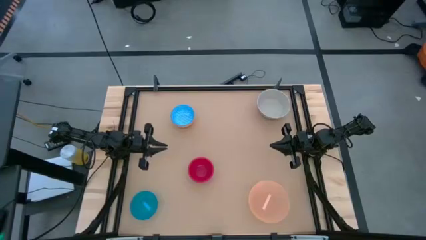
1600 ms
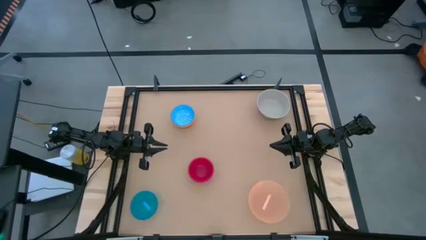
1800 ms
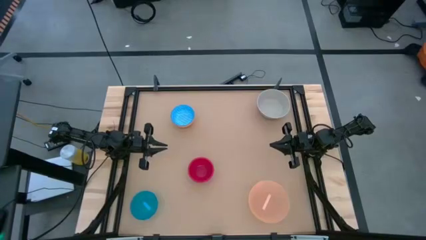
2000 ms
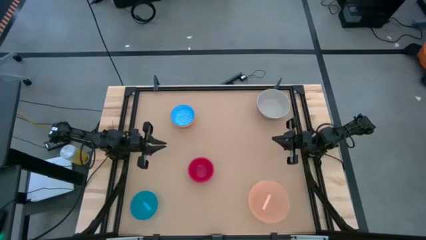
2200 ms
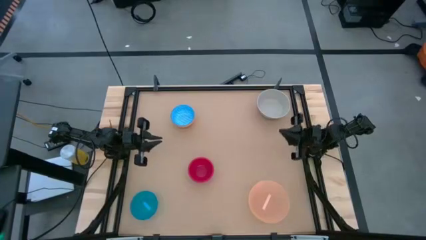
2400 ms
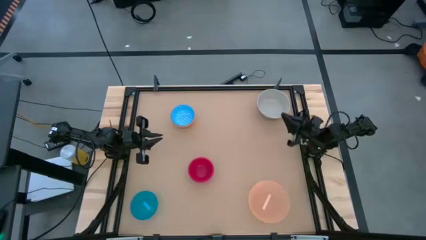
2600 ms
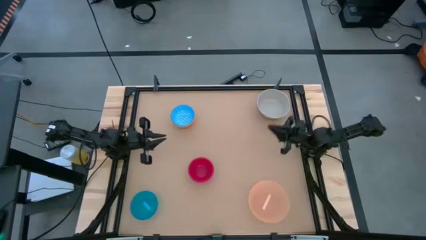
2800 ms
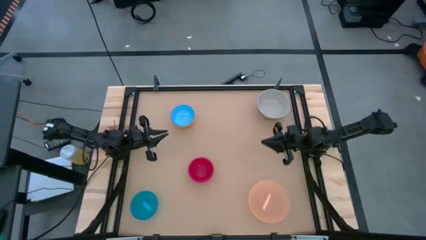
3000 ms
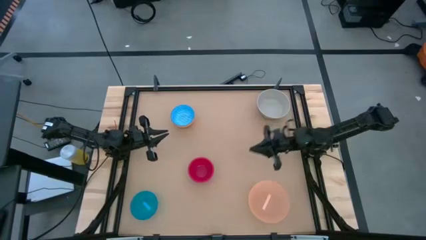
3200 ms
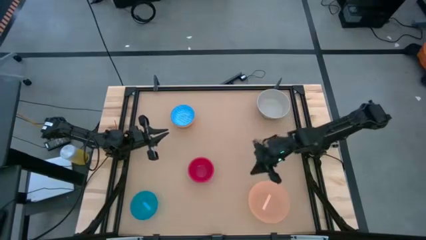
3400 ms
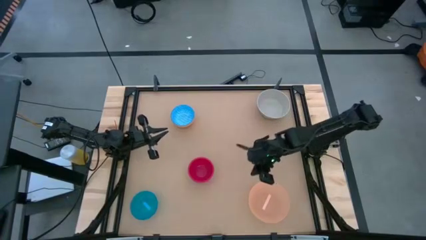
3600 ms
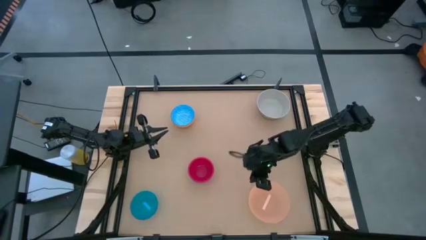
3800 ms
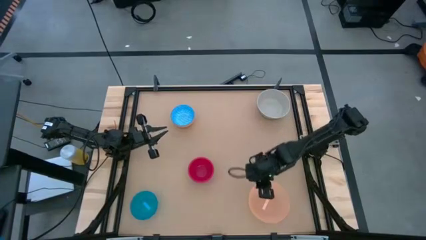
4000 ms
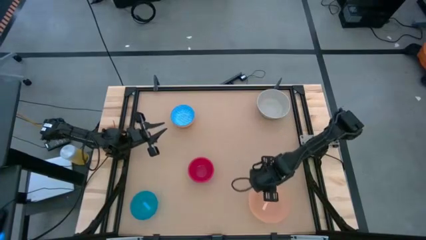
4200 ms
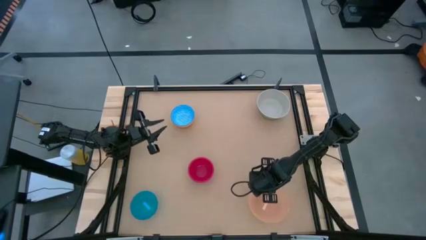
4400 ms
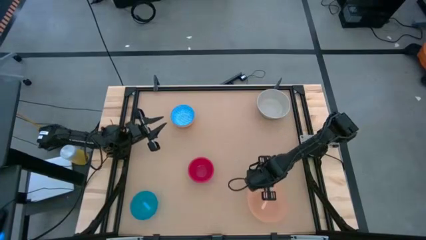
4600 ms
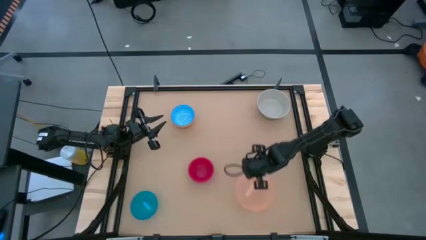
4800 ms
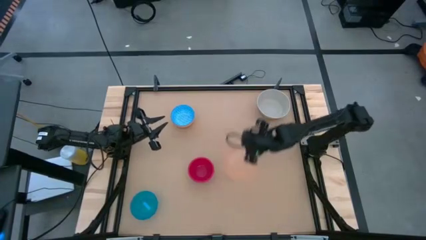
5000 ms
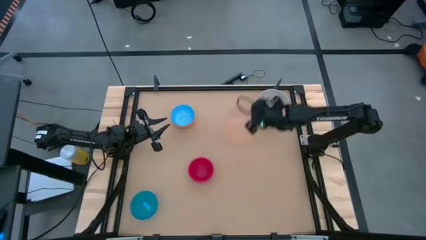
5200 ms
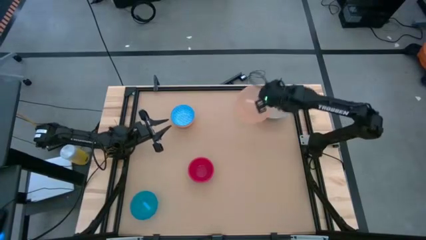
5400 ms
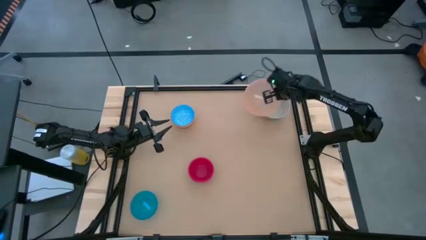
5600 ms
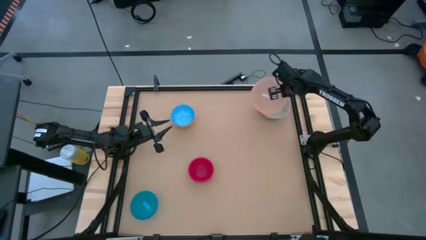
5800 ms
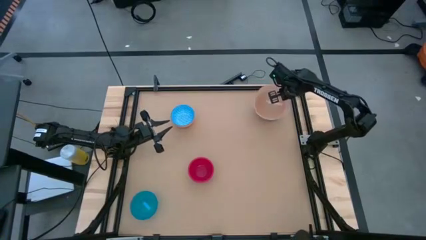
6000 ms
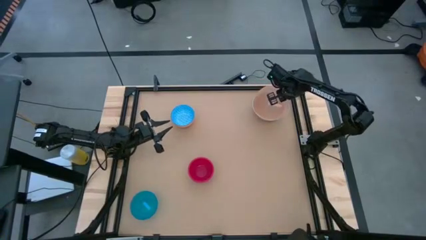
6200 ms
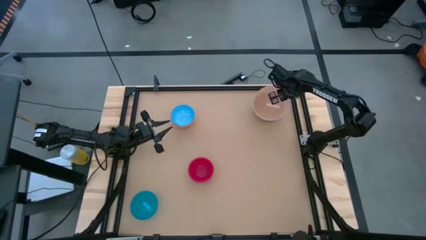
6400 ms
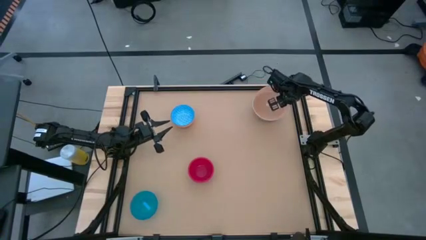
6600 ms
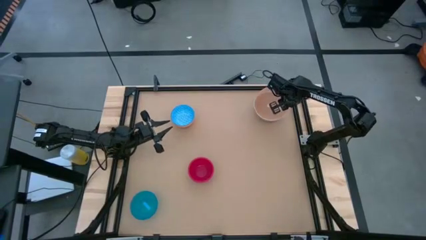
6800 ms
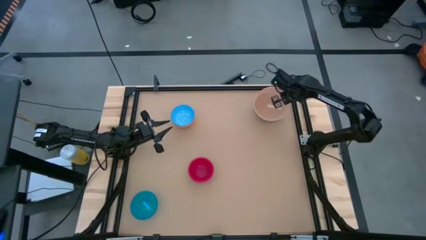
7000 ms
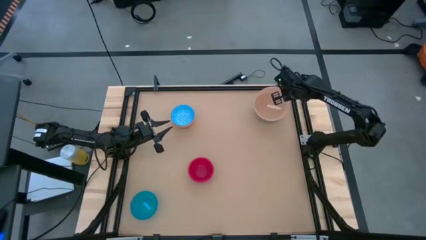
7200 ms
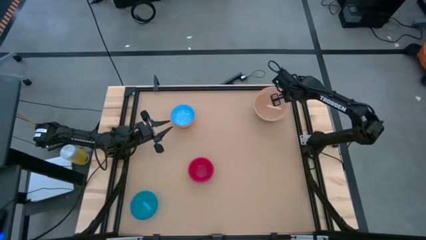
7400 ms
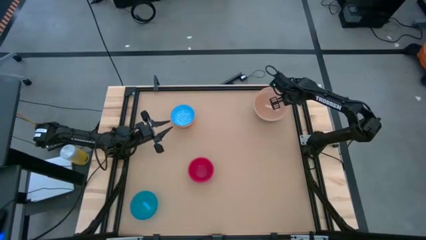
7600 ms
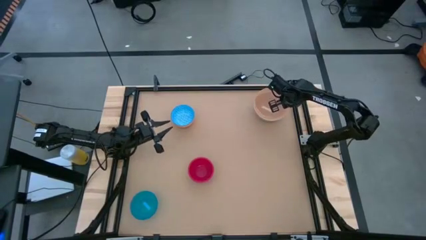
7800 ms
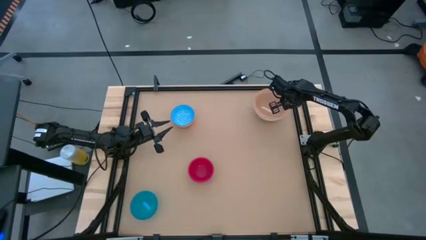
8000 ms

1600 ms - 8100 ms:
Put the orange bowl on top of the white bowl

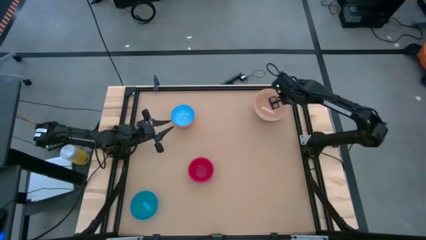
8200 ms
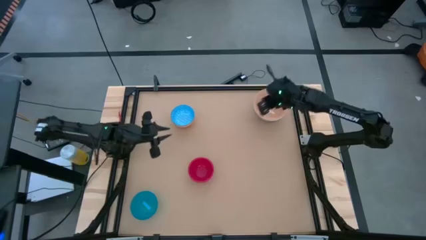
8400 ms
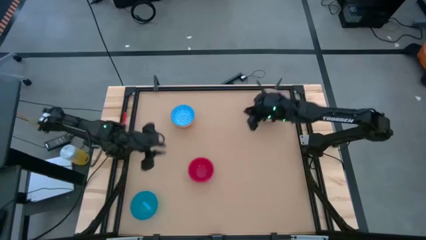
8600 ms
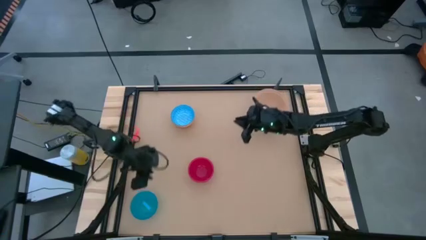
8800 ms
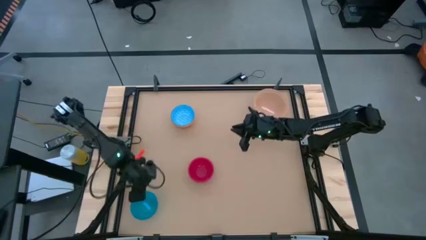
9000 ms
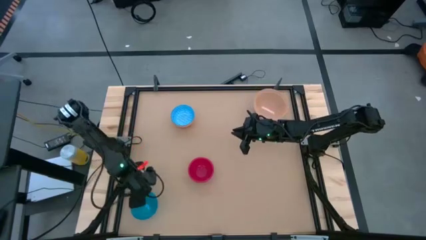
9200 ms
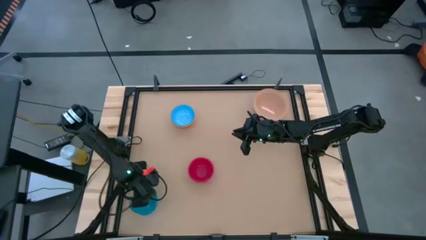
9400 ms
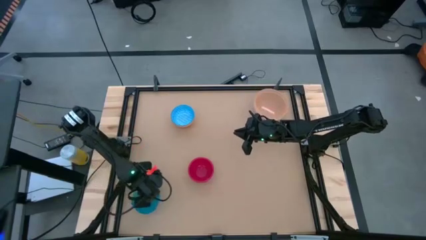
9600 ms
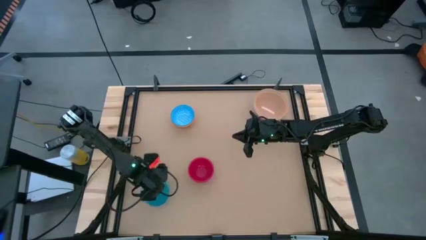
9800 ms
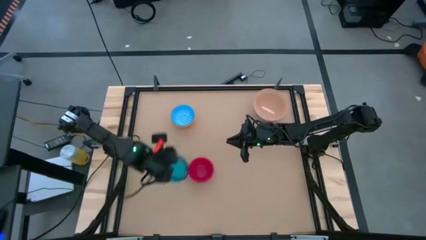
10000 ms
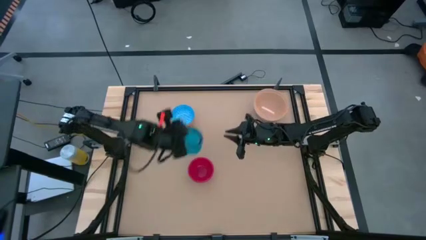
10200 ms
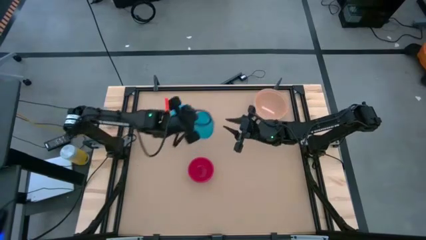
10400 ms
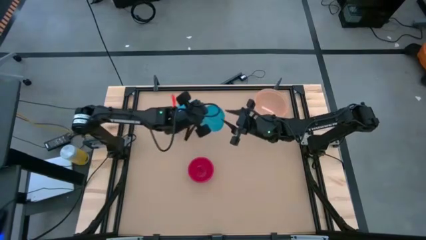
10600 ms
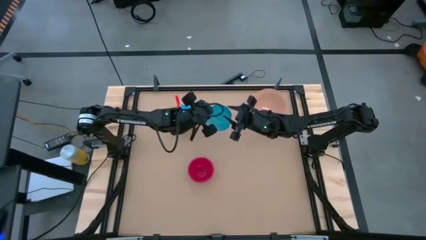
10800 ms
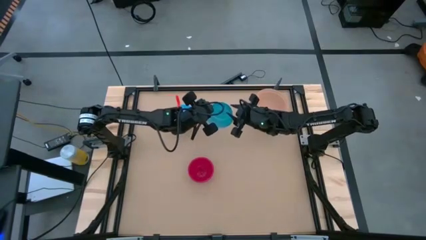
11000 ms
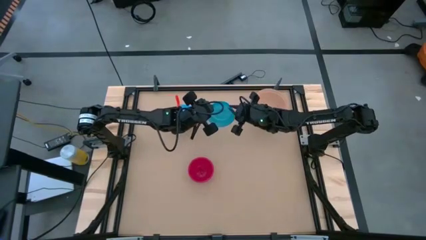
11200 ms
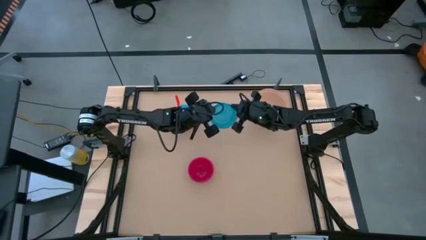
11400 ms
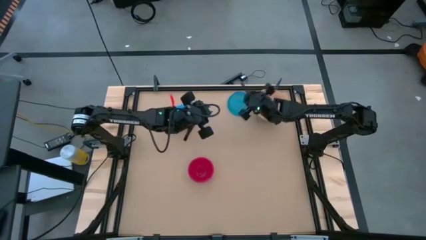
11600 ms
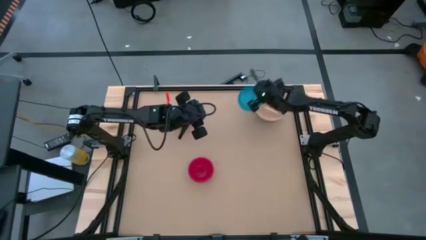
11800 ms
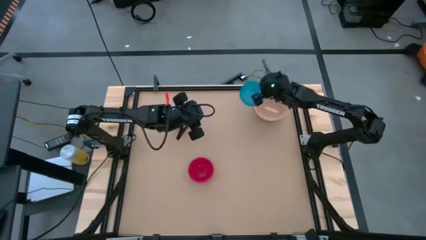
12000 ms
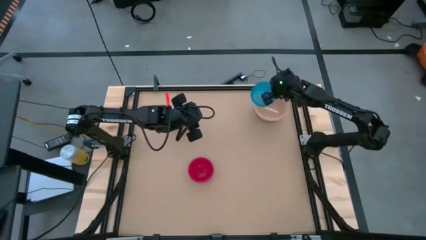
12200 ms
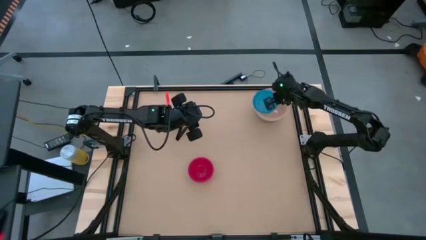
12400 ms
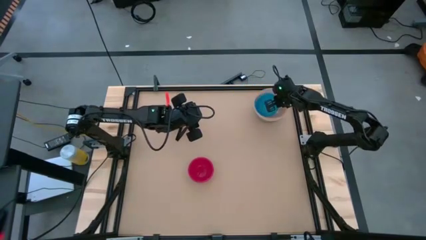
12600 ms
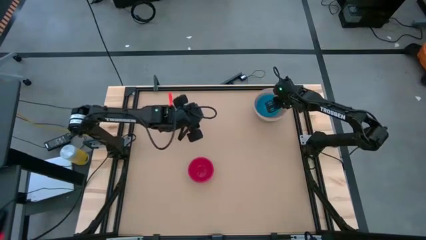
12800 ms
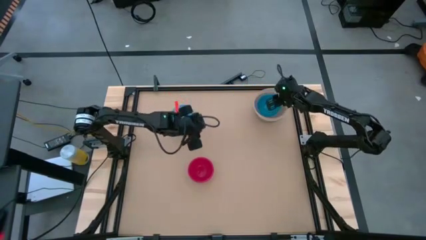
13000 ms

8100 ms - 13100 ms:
Put the blue bowl on top of the orange bowl

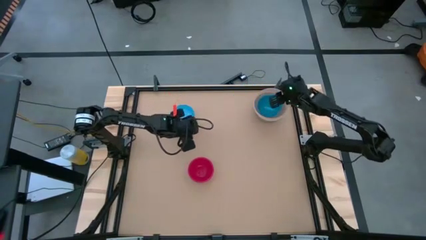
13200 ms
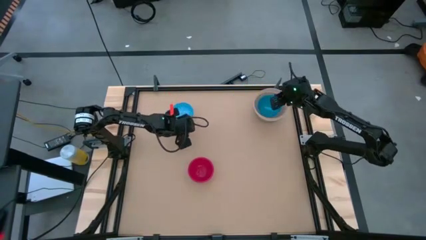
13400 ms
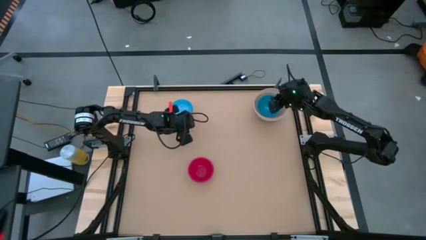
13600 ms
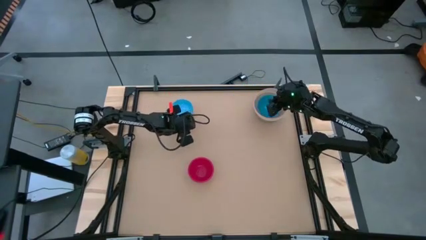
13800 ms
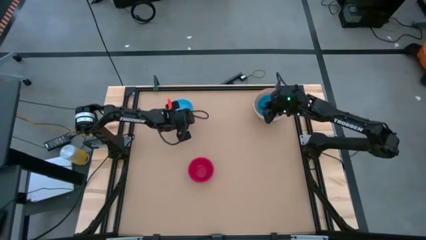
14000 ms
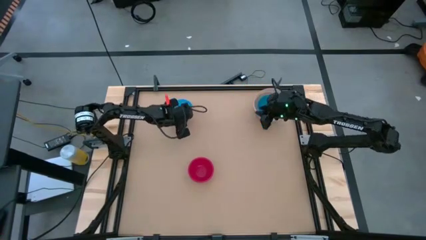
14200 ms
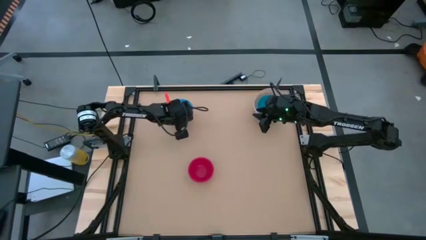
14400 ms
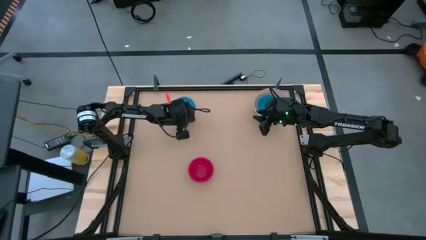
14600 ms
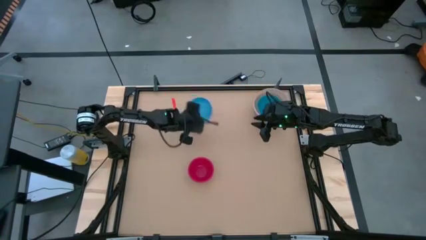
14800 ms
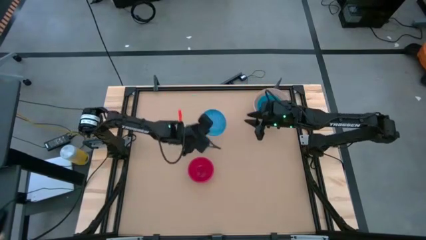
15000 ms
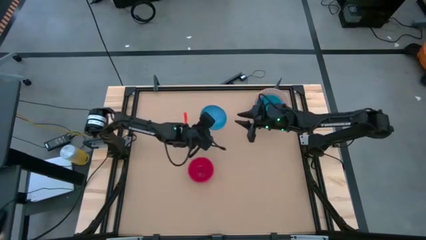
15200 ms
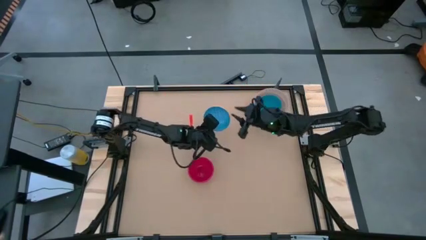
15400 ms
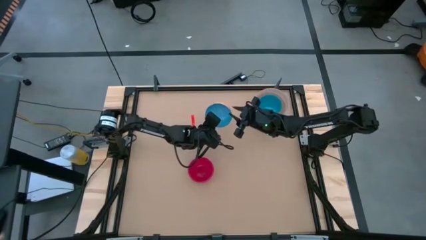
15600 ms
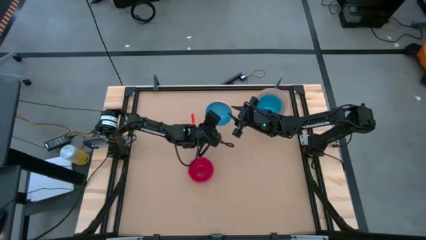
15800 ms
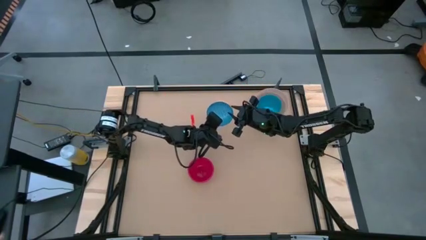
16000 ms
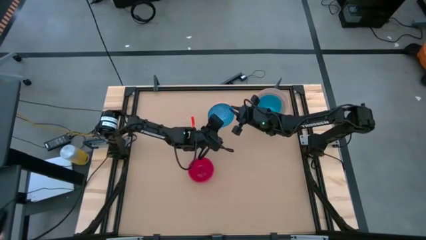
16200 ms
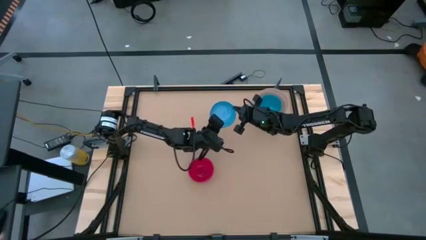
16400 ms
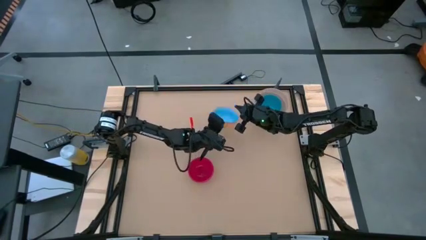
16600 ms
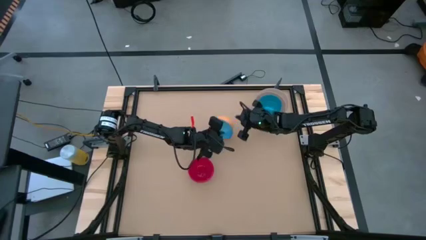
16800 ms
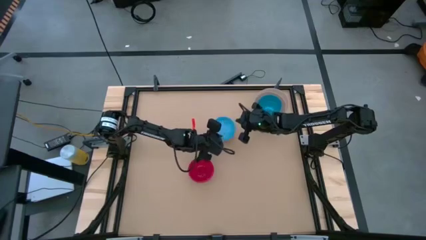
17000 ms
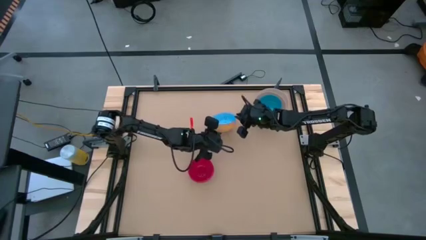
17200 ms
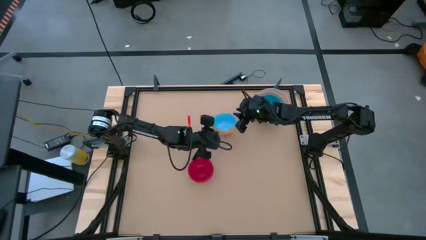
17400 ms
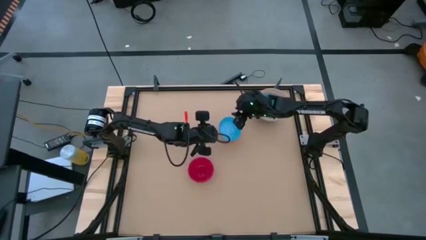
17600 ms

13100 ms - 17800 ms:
Put the blue patterned bowl on top of the blue bowl

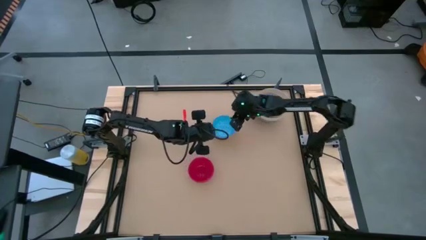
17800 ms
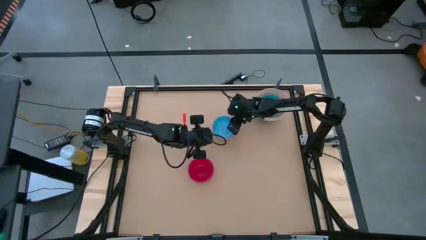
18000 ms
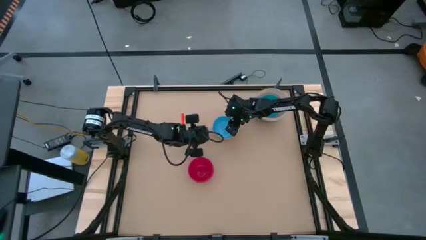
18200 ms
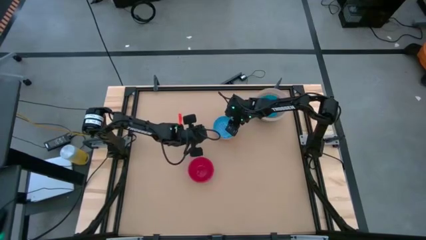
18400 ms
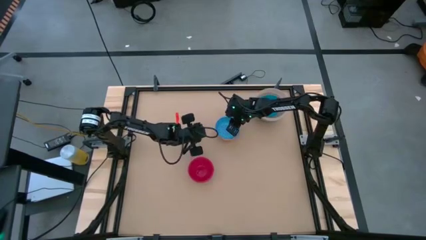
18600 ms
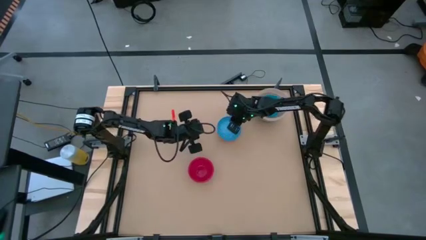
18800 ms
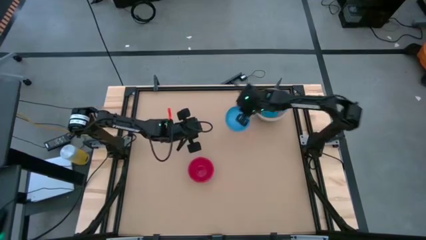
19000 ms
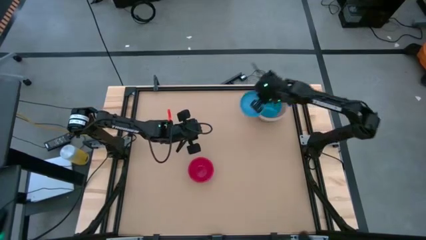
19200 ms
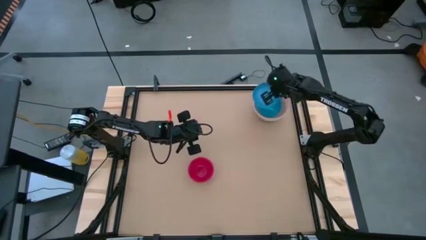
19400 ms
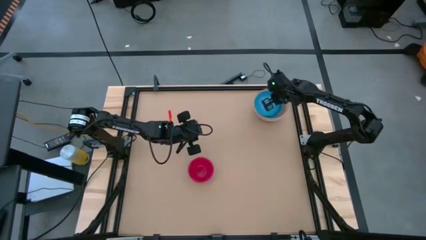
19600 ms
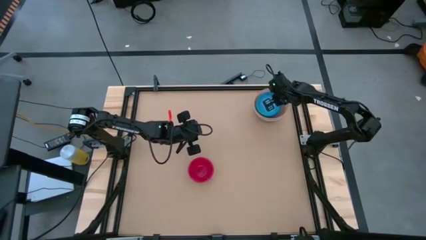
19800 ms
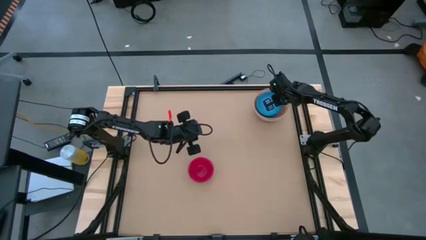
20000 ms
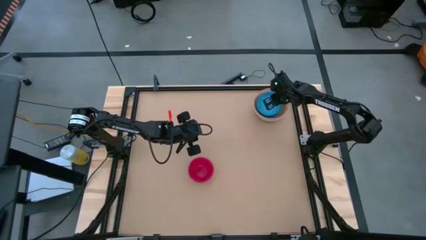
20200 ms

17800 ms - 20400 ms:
Put the blue patterned bowl on top of the blue bowl
